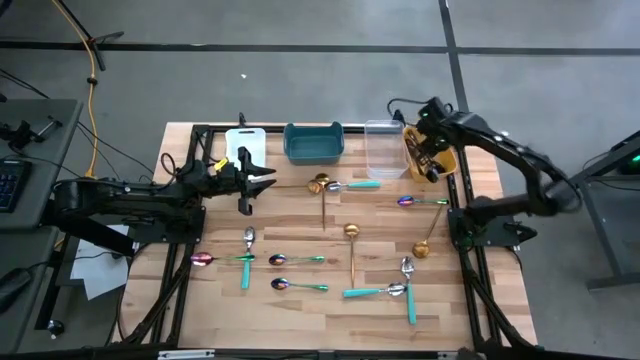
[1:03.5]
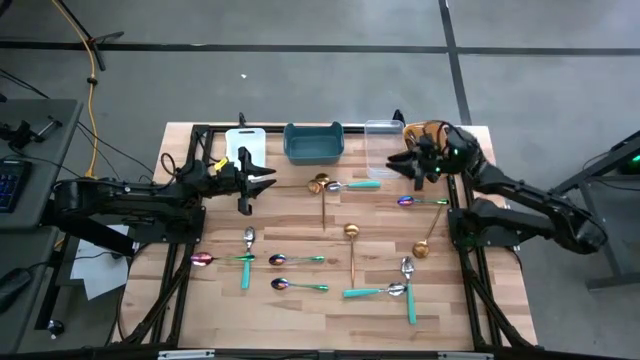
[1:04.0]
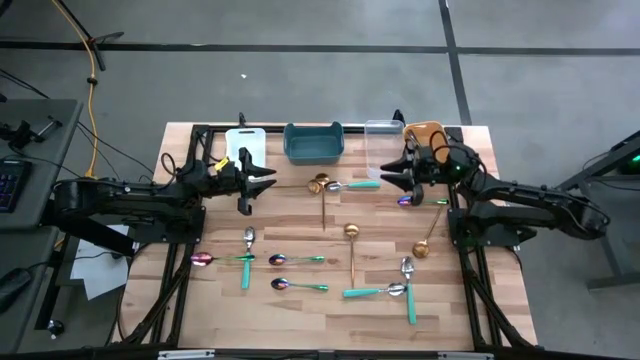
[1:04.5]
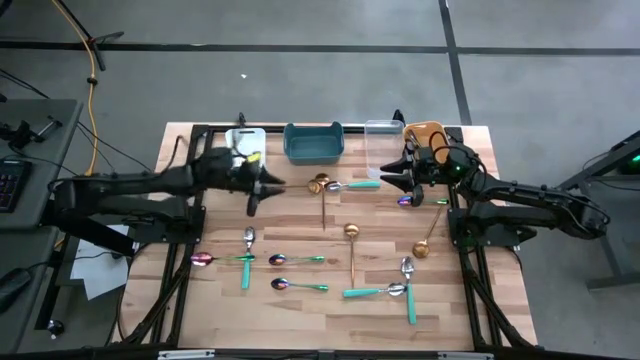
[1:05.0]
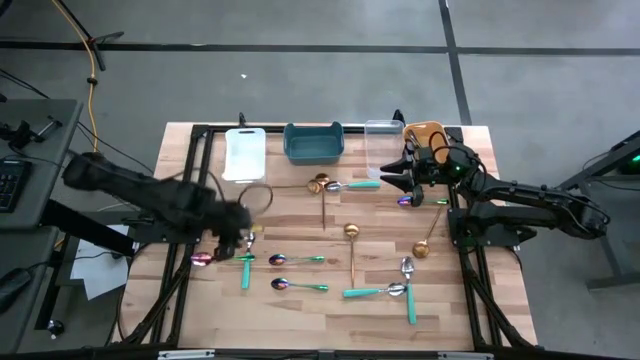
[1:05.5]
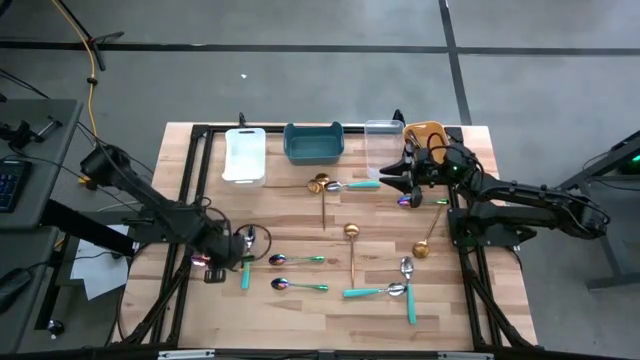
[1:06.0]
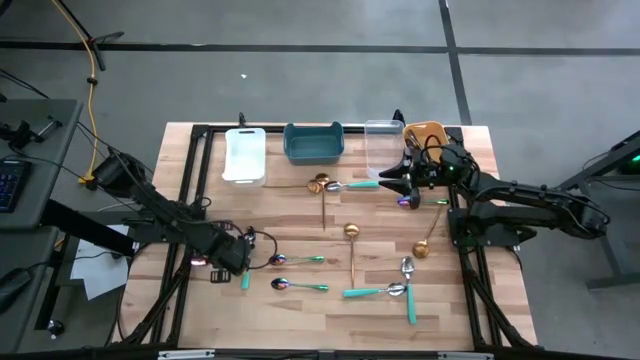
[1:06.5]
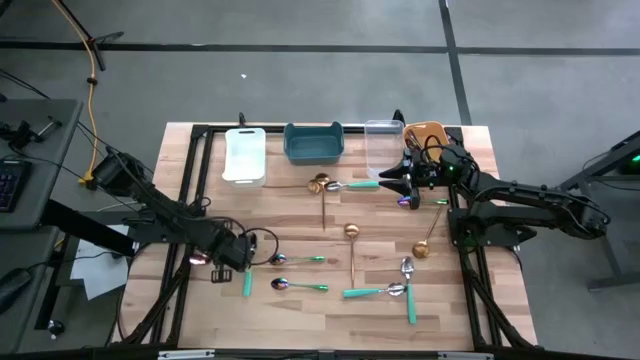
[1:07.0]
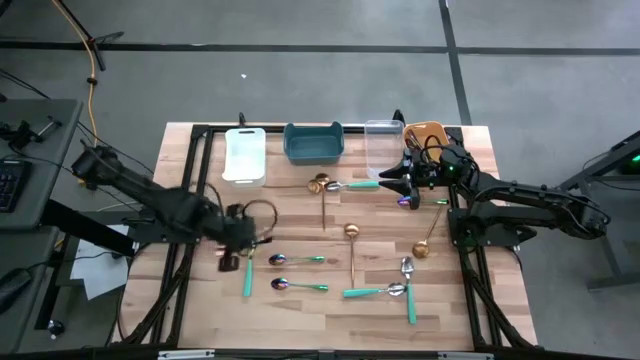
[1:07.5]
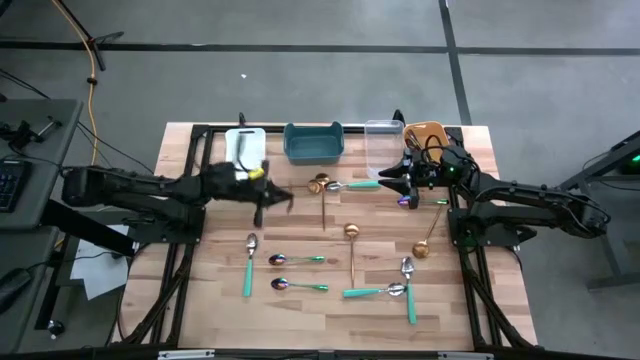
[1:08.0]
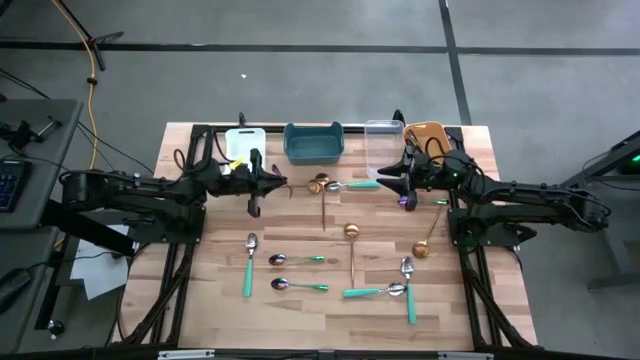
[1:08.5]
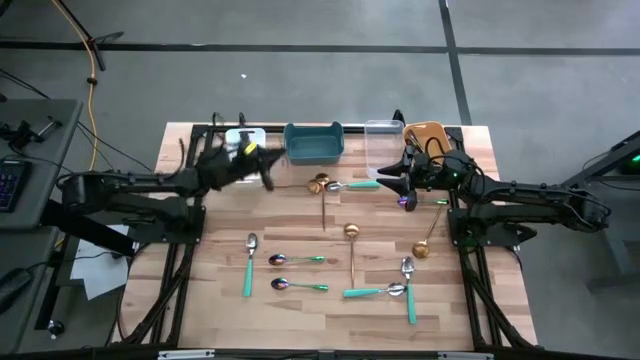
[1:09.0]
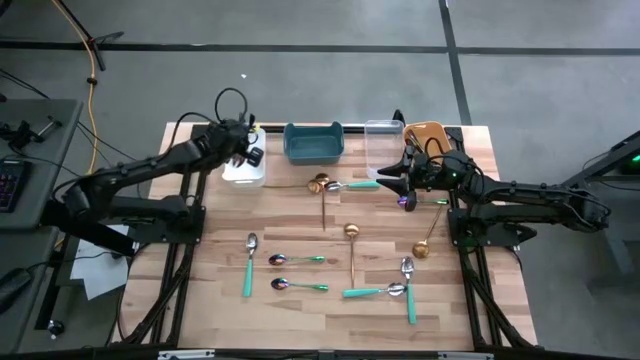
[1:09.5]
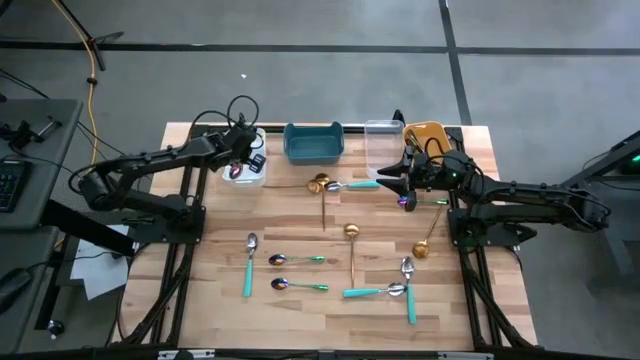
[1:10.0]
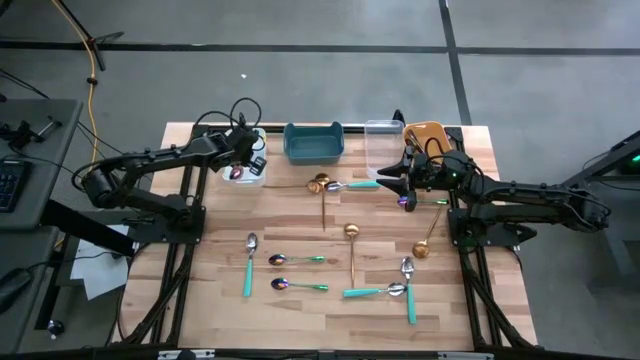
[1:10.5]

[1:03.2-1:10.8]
Task: Sort silverware by color (type)
Put the green spoon into the white bin

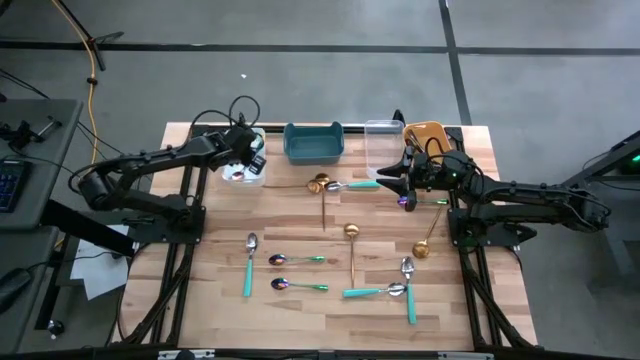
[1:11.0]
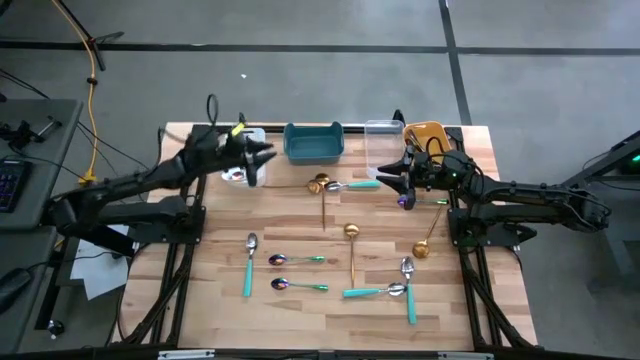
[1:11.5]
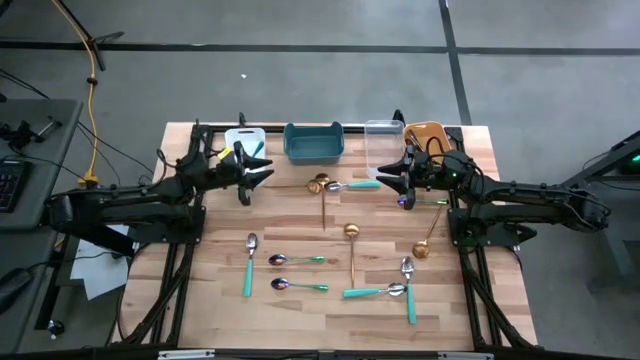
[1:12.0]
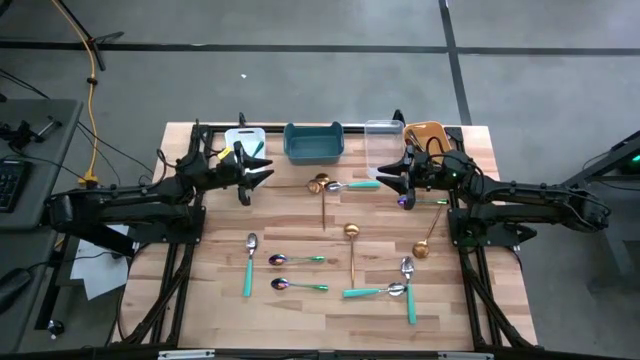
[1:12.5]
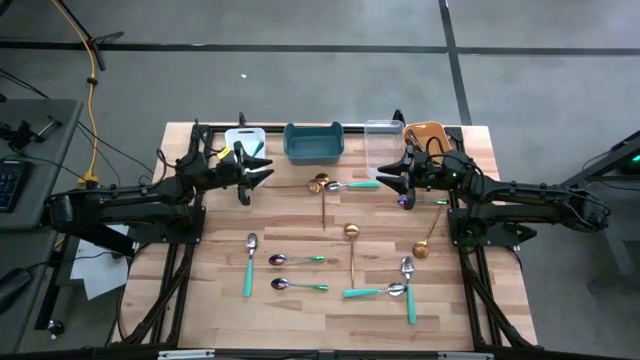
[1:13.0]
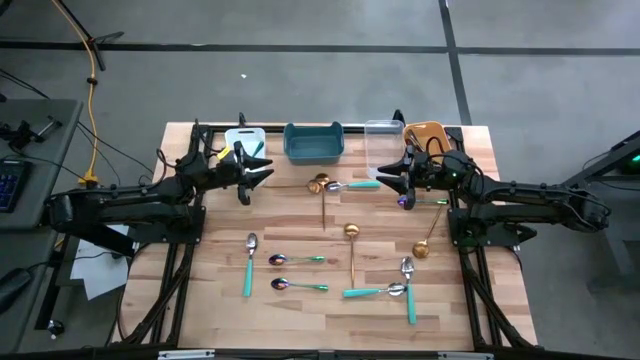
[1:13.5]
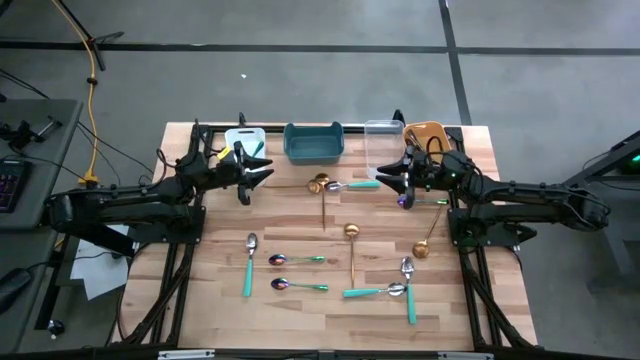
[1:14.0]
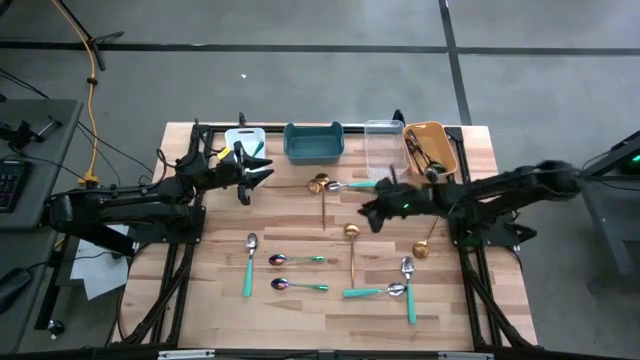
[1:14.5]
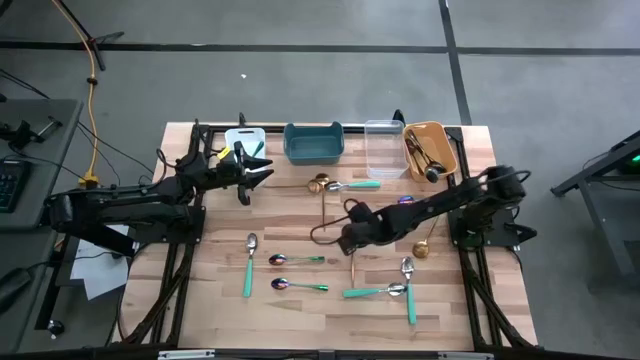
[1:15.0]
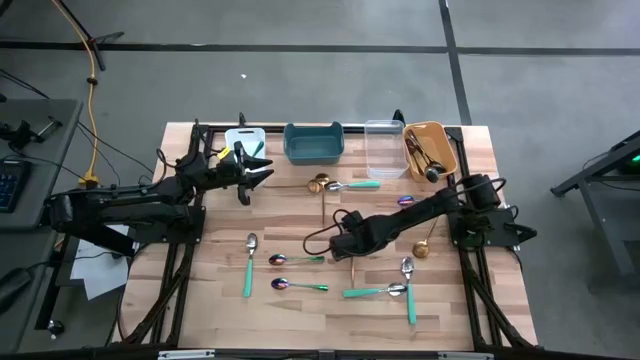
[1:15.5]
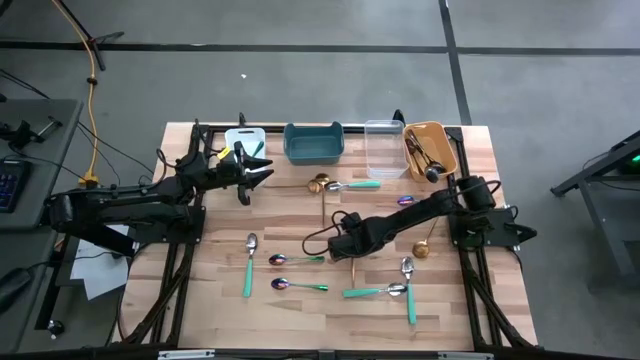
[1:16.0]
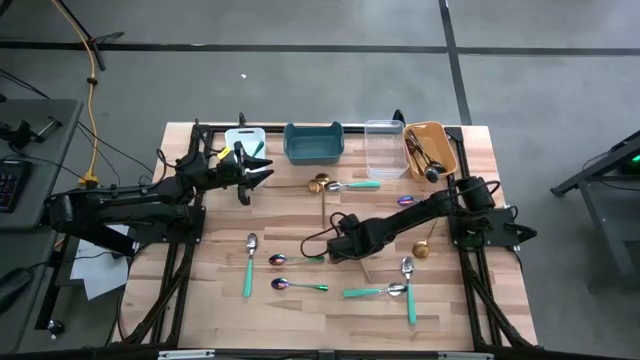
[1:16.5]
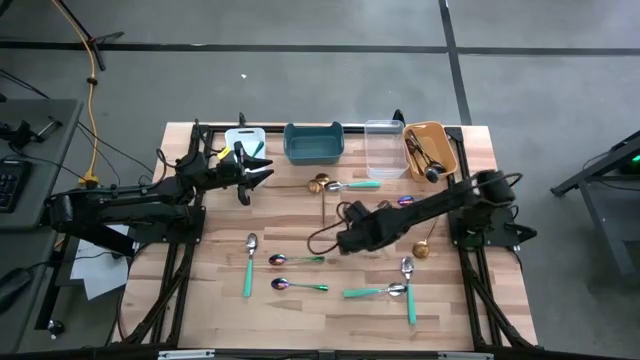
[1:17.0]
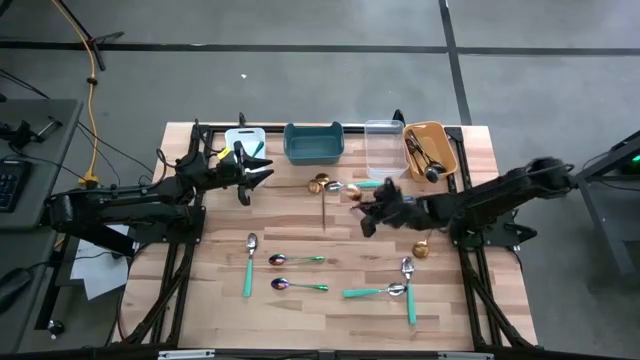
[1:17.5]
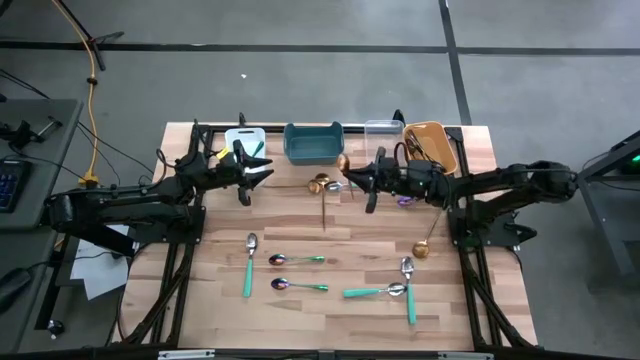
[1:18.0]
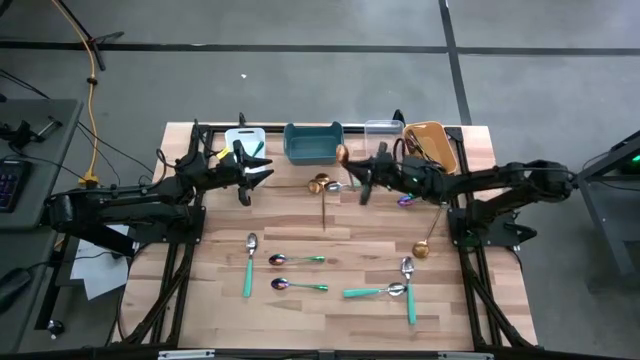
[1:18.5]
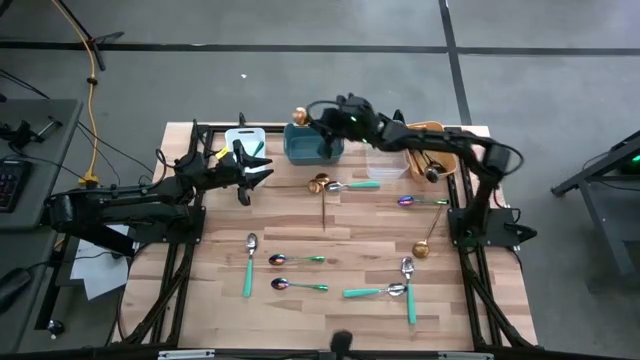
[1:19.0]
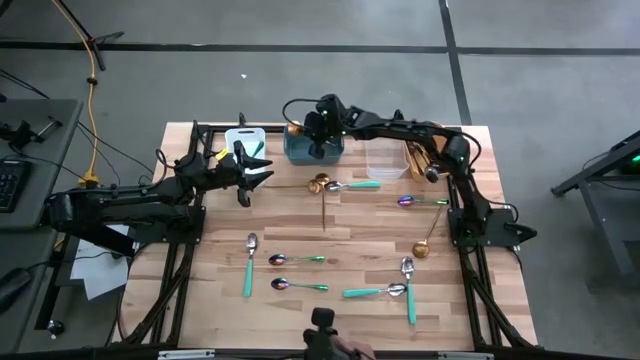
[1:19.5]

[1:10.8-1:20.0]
Put the gold spoon into the blue bin

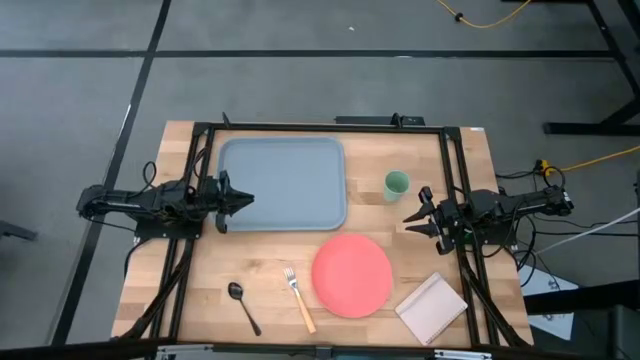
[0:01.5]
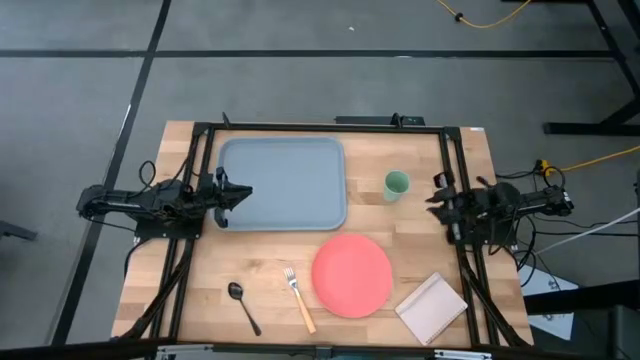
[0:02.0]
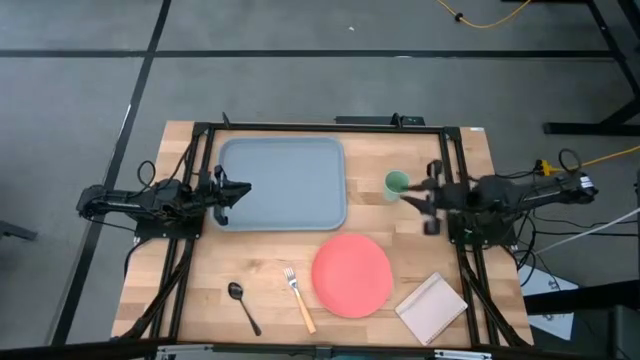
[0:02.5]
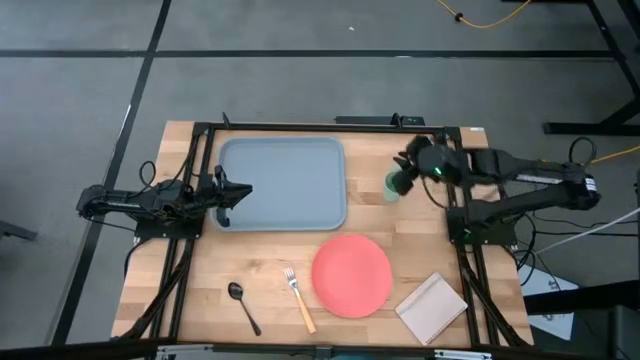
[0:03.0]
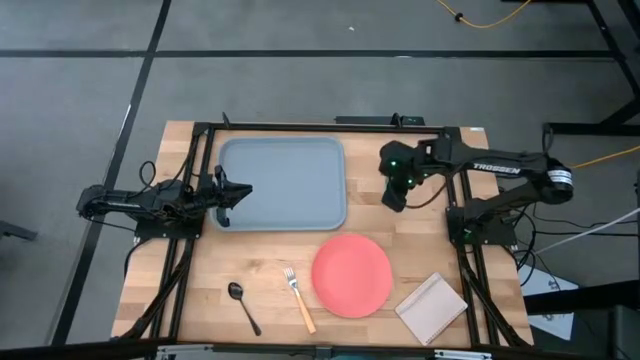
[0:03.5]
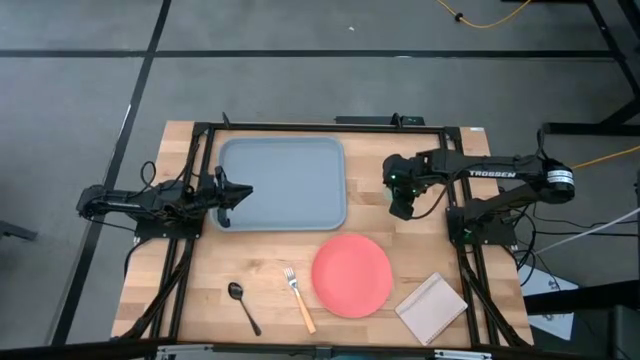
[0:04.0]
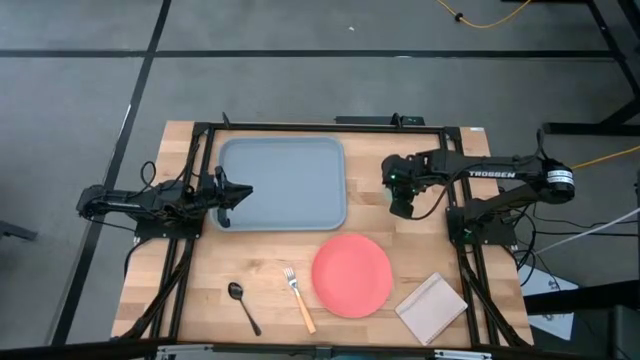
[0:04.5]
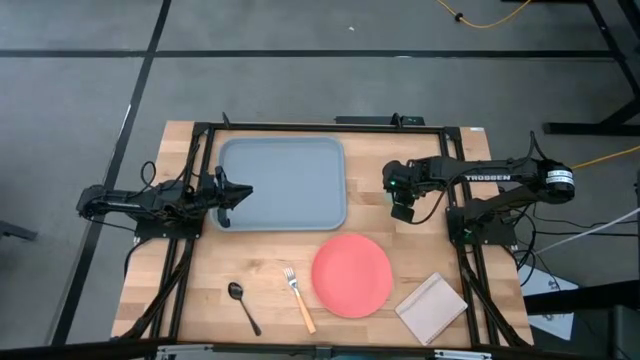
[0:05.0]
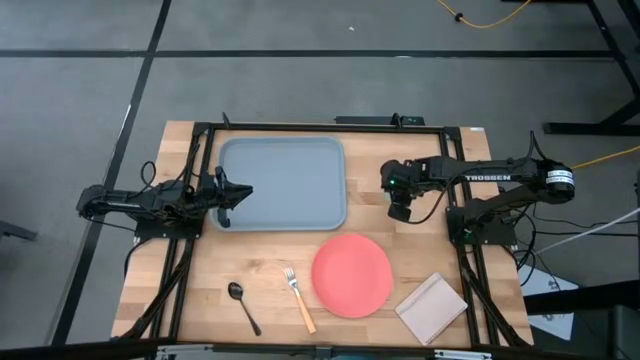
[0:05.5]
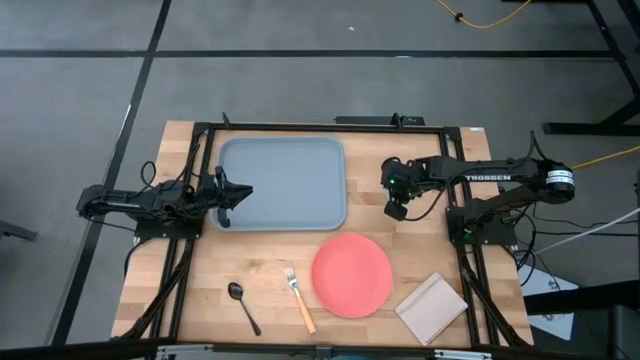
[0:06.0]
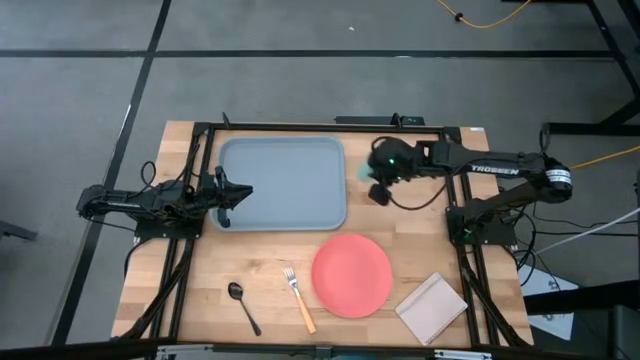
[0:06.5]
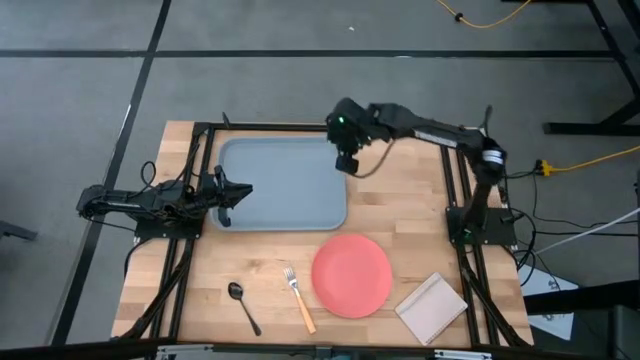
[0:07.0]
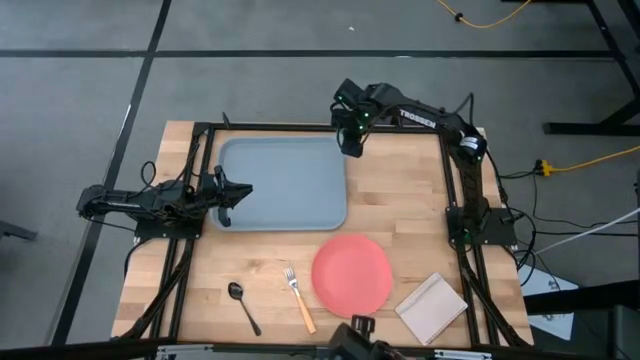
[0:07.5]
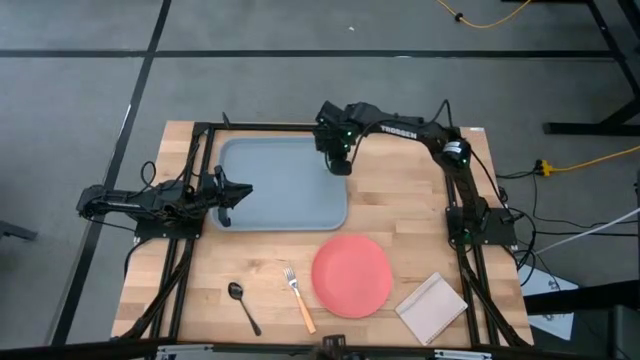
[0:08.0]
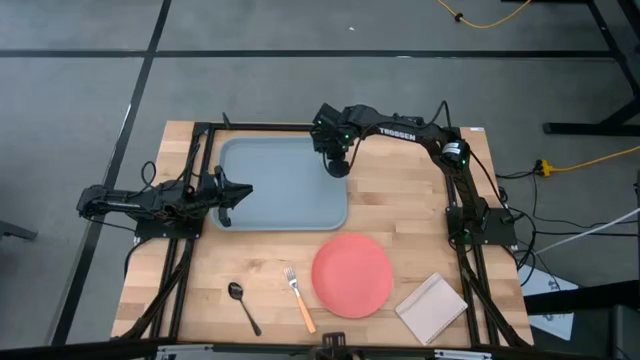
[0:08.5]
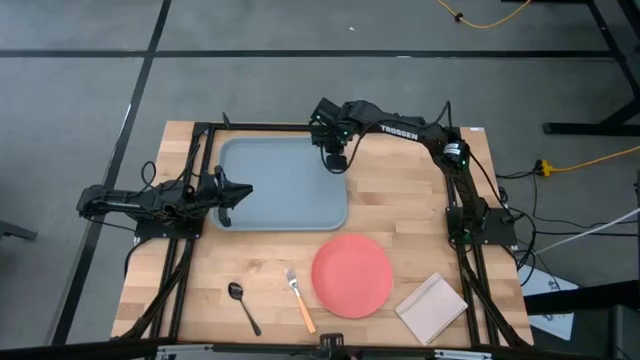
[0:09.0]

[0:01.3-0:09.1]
Task: Pick and place plate/cup/fork/spoon on tray
Put the green cup to the top right corner of the gray tray
